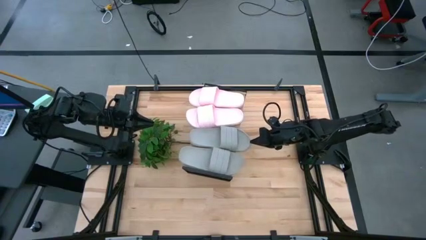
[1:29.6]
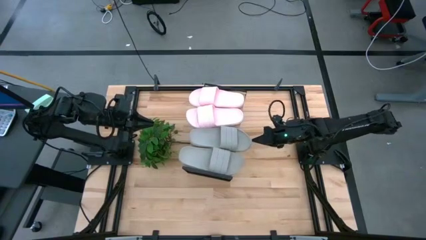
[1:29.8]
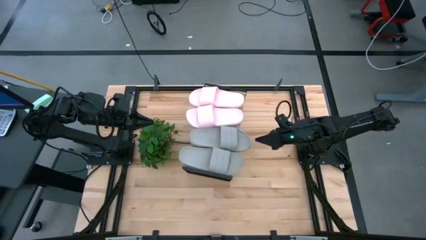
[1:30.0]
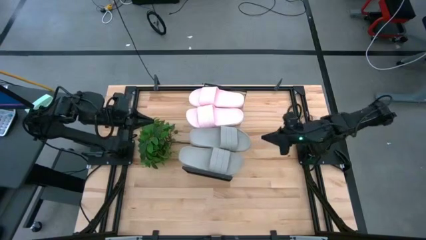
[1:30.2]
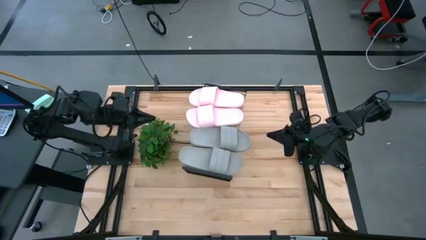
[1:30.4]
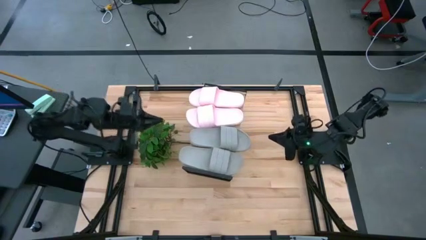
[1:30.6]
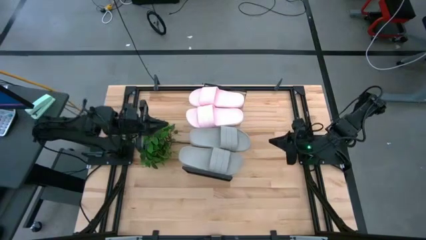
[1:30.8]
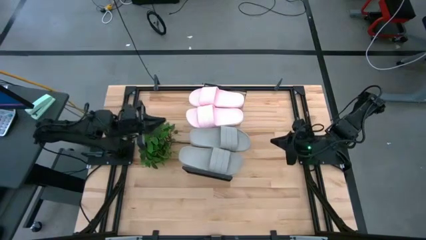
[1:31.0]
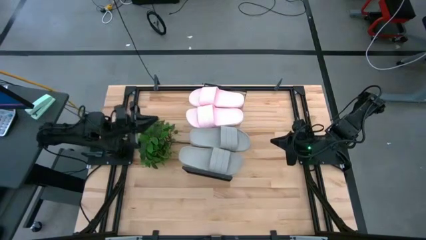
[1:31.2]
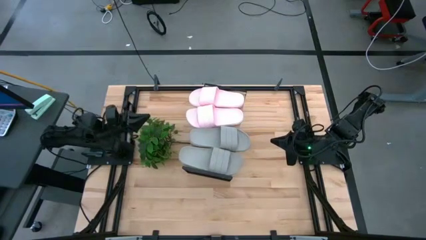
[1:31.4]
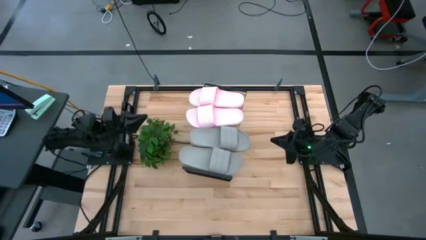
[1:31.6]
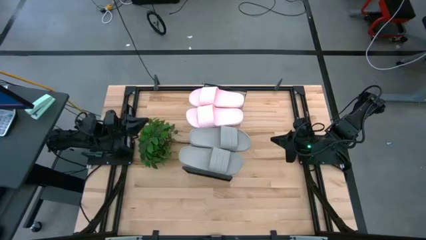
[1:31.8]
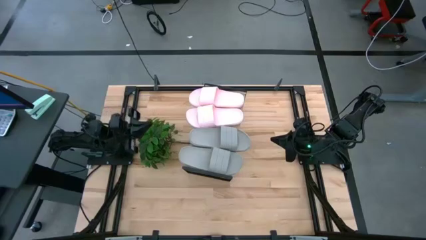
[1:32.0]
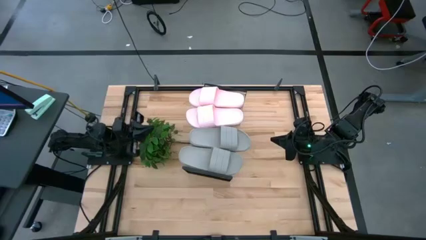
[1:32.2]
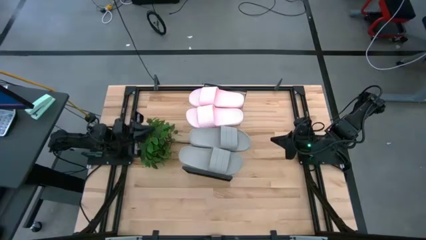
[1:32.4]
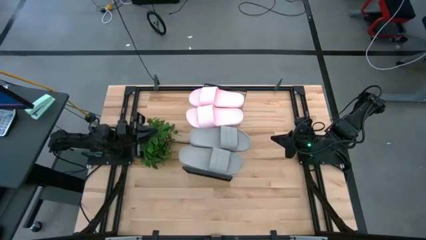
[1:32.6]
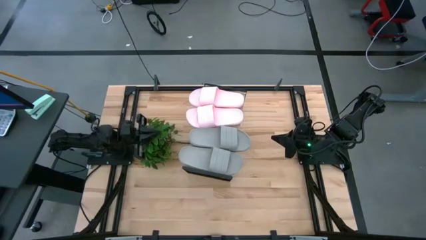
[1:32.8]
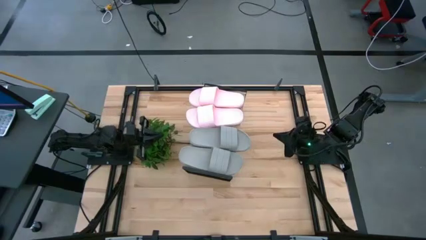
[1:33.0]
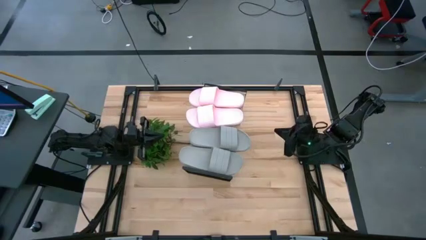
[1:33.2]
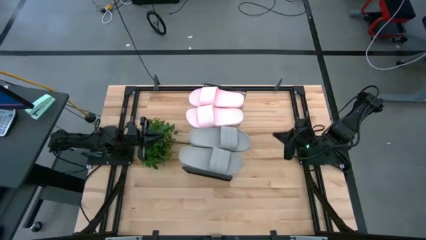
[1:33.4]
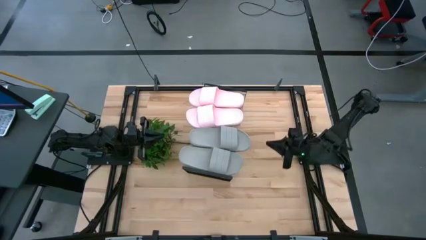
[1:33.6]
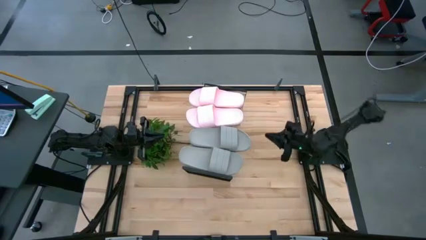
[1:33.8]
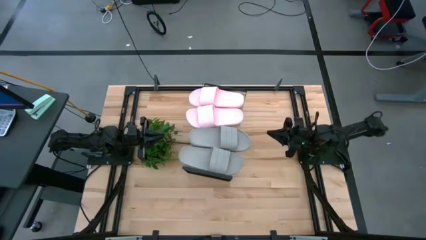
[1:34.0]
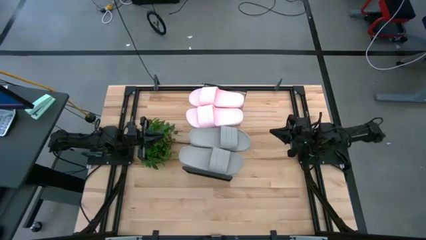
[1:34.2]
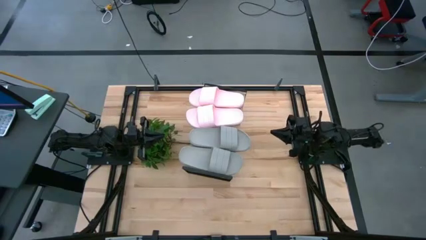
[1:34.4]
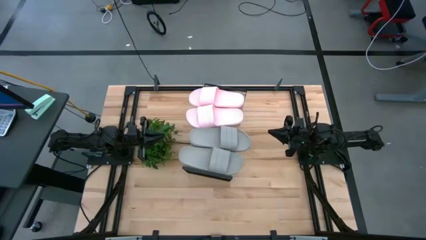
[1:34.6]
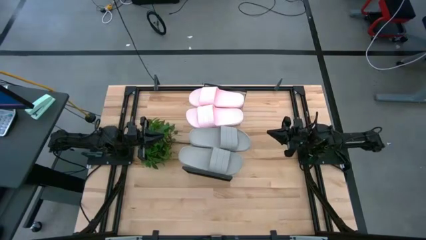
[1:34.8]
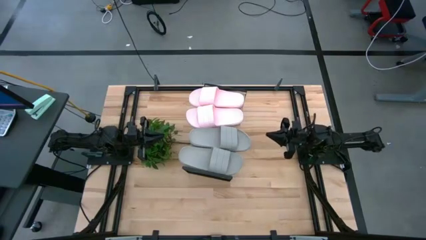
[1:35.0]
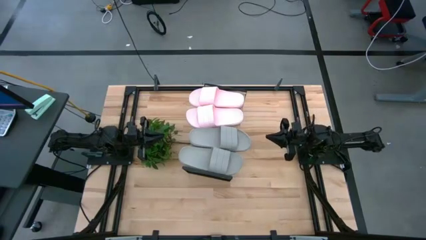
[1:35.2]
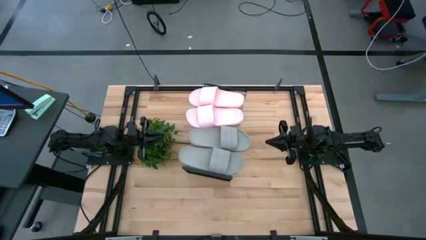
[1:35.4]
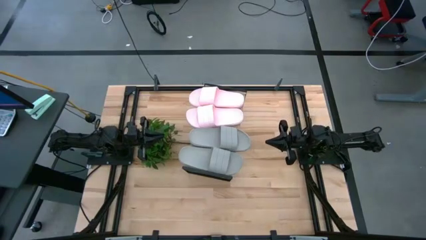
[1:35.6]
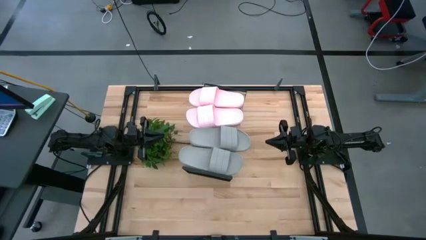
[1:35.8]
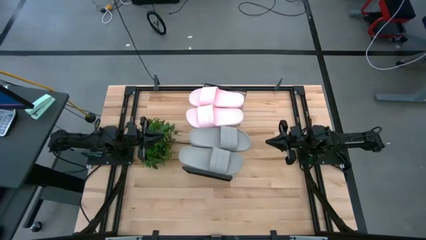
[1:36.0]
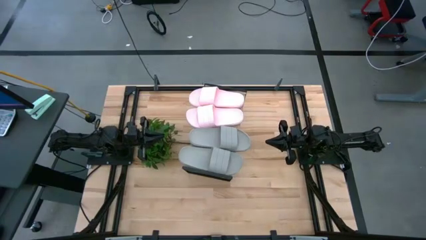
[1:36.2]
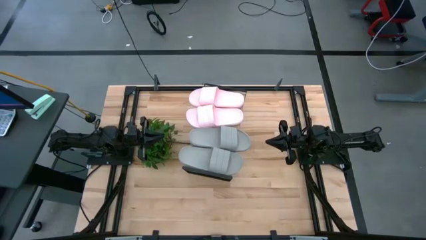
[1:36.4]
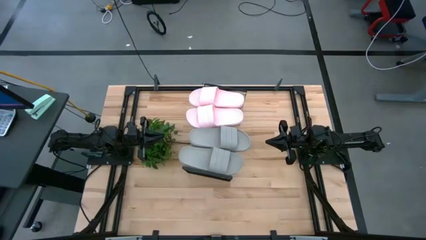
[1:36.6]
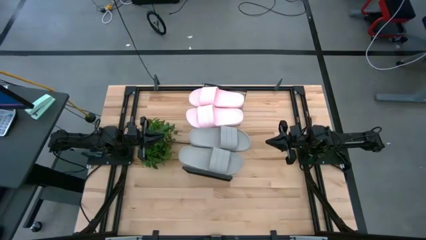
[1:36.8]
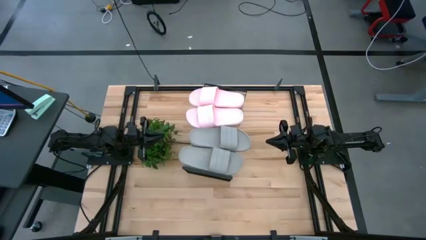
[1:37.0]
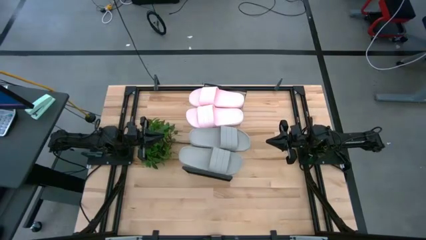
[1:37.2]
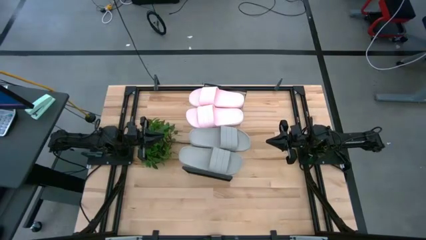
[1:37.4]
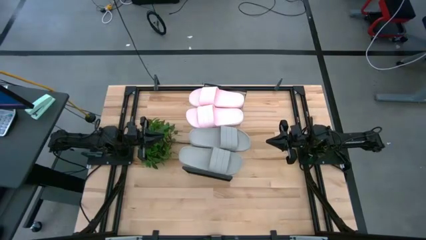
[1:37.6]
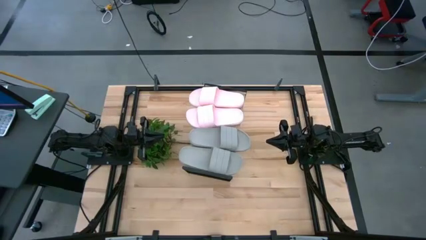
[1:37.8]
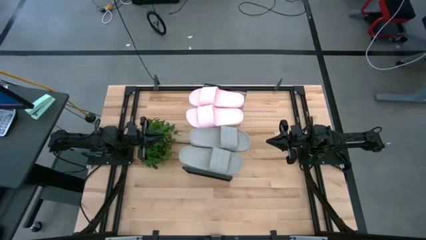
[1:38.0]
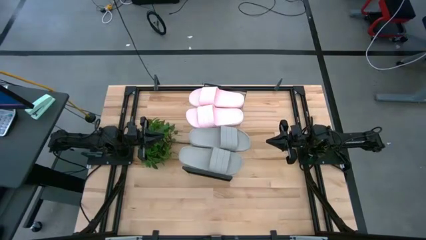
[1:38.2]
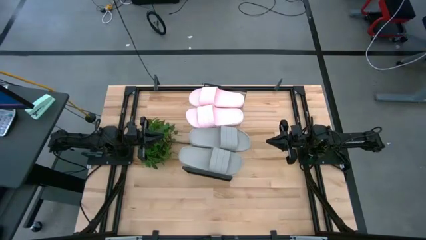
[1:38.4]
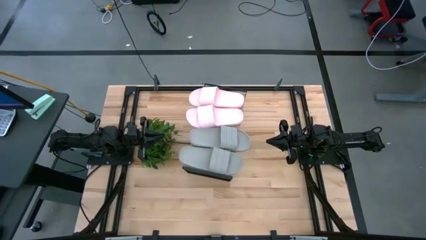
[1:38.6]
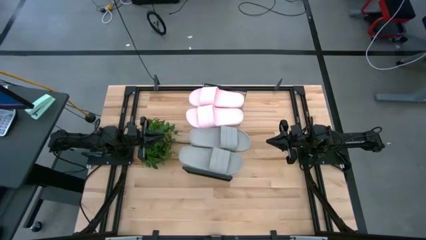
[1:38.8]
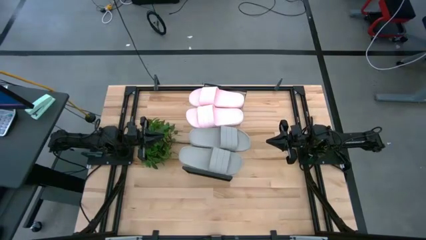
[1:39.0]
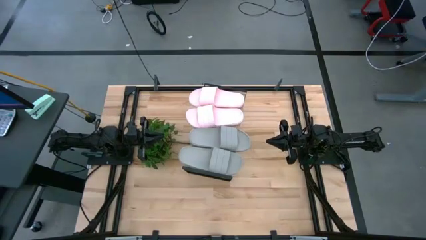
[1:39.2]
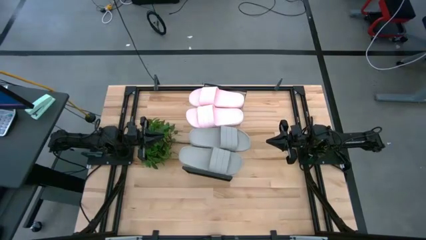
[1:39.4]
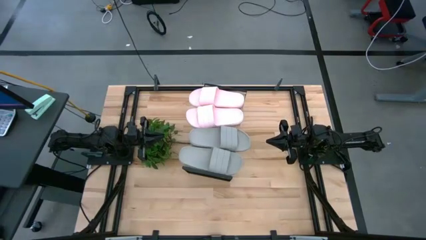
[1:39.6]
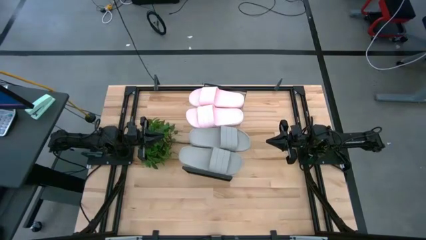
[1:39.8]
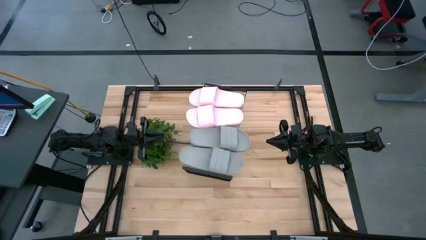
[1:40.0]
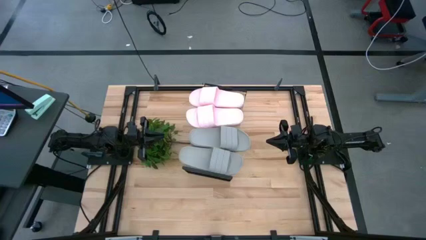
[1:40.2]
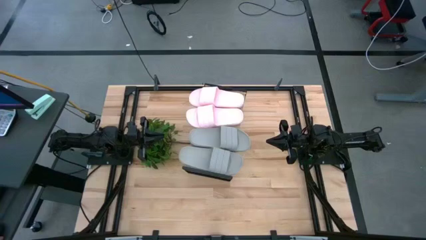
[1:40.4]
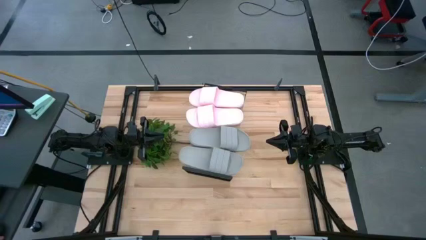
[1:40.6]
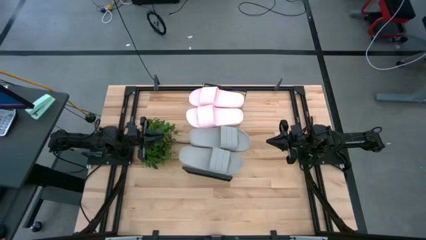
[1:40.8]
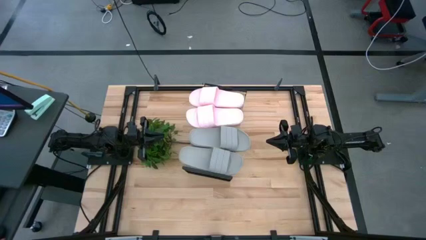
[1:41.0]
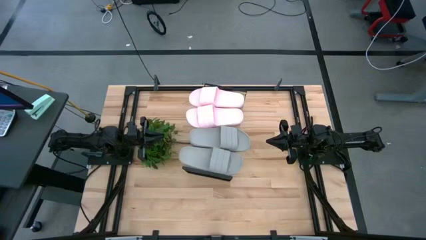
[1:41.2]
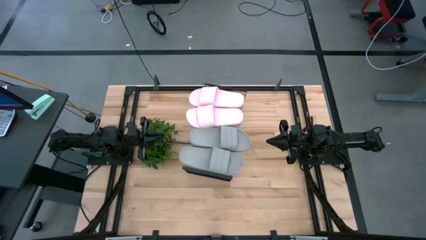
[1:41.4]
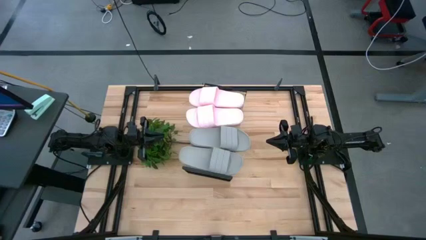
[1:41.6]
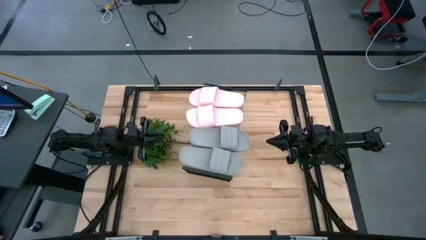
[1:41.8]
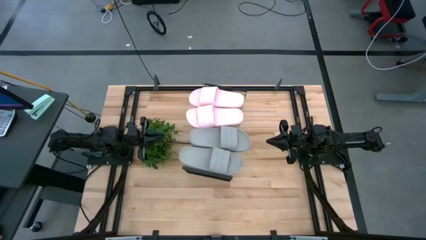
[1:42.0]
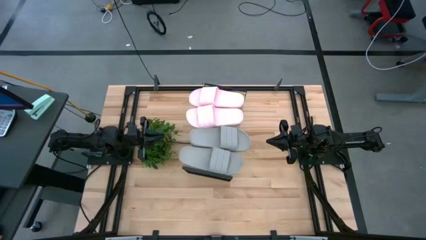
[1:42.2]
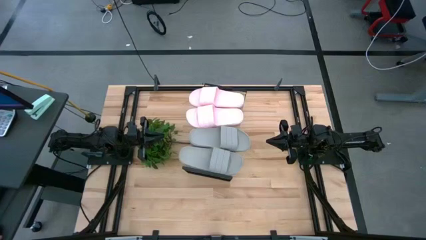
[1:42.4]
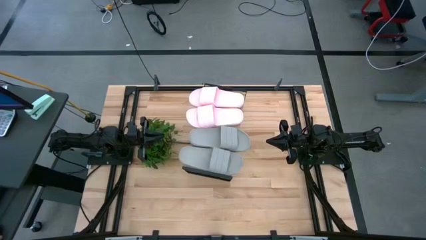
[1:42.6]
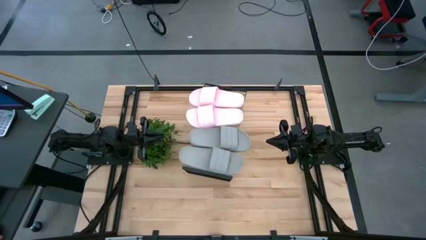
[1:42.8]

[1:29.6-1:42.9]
Task: Pick and place slides into the shelf
Return to Home Position

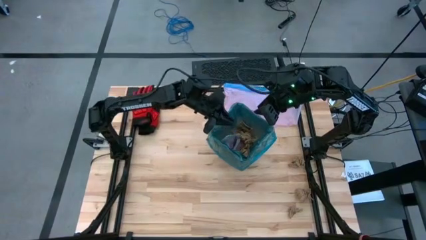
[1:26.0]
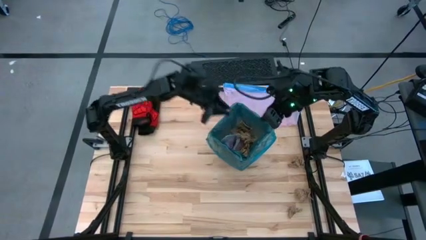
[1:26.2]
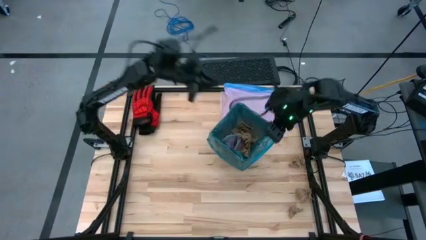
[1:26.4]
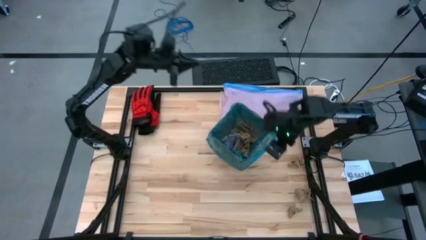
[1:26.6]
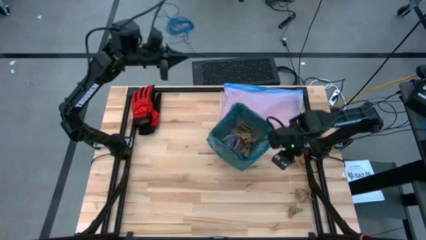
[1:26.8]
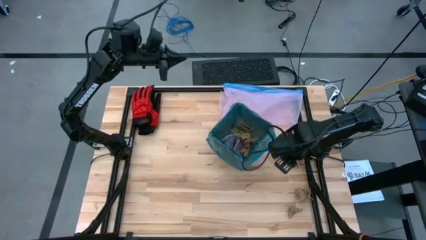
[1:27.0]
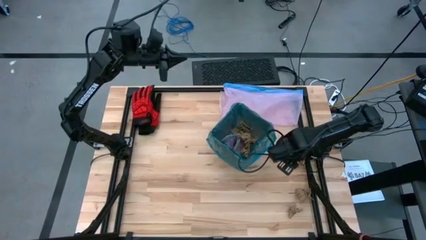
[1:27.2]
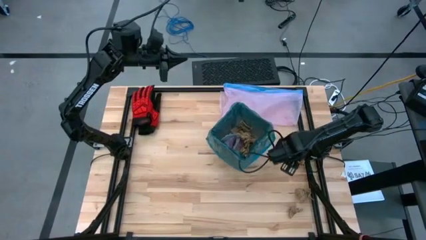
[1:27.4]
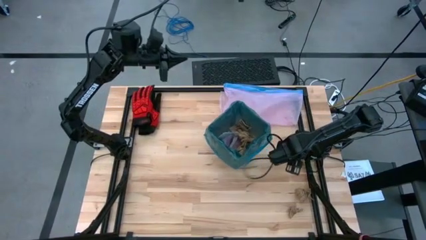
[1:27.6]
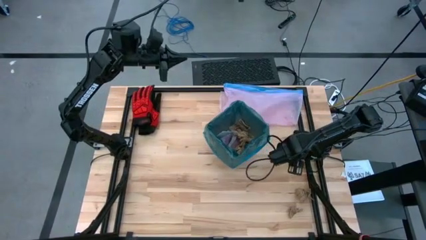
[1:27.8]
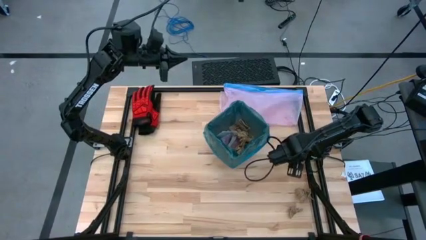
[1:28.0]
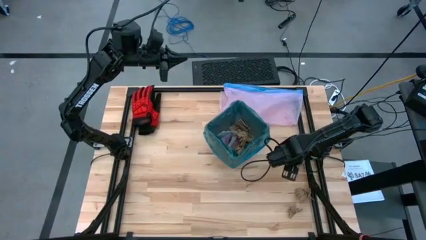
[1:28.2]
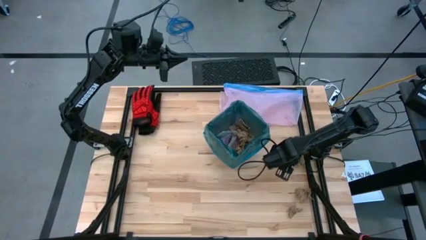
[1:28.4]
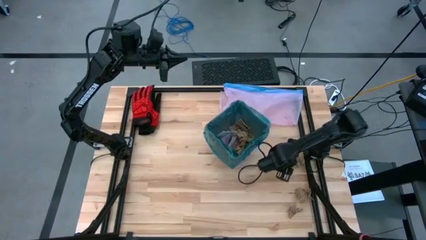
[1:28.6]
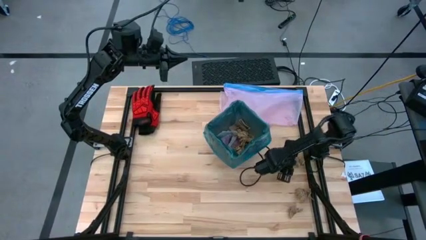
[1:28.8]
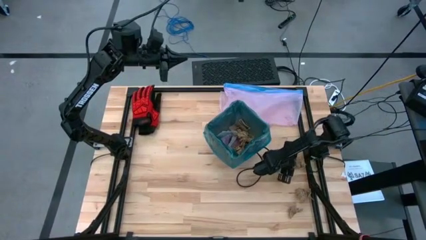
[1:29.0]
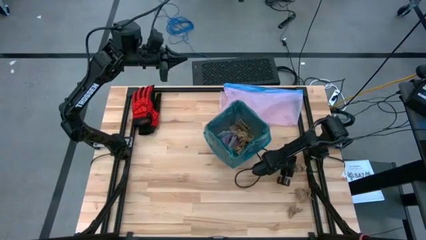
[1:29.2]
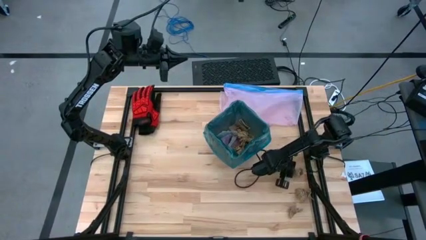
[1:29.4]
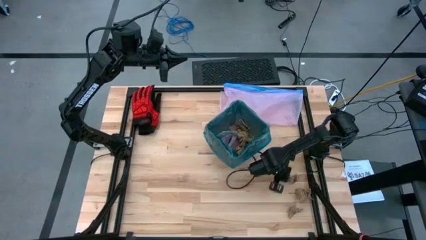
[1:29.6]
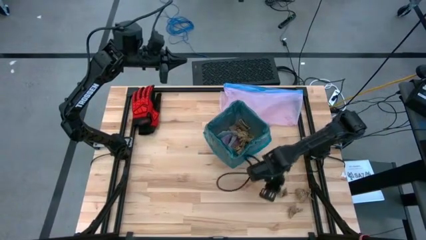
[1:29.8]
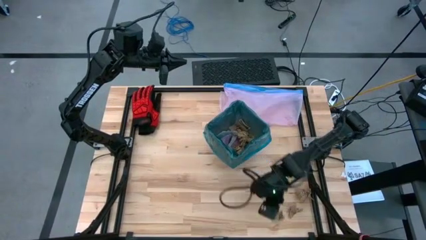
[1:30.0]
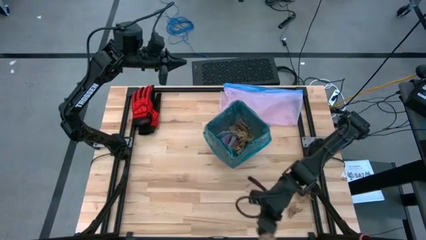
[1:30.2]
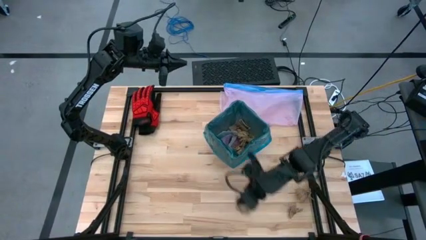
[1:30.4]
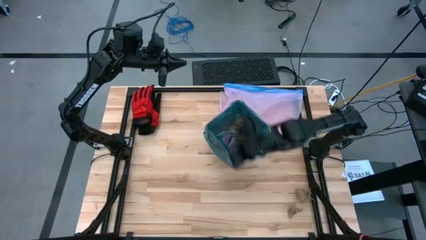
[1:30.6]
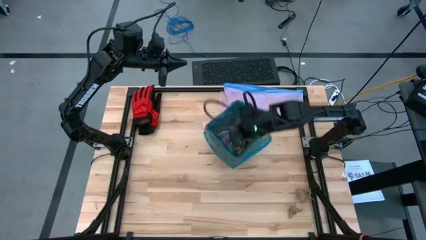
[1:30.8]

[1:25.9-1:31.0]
Task: place trash/remove bag and relplace
Put the brown napkin into the black trash bin
